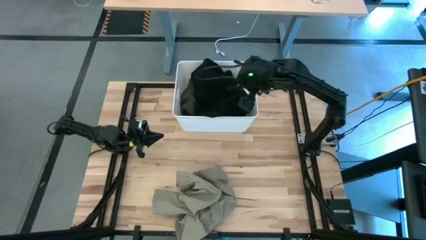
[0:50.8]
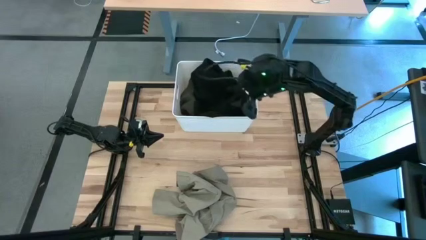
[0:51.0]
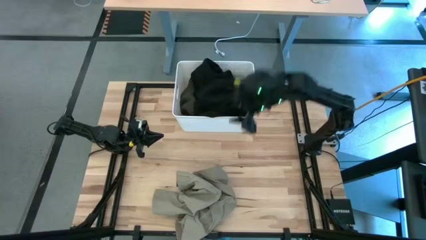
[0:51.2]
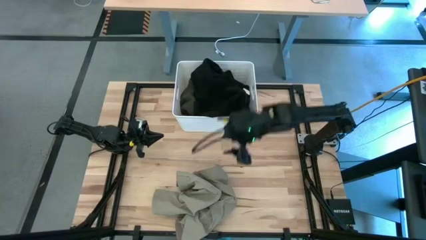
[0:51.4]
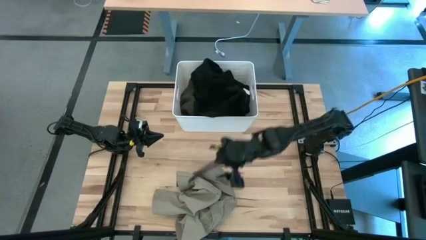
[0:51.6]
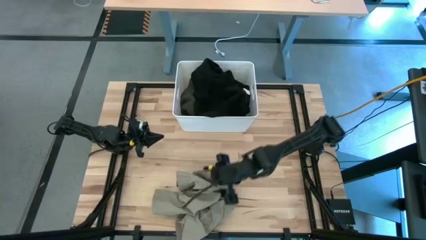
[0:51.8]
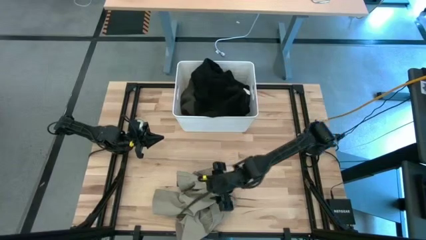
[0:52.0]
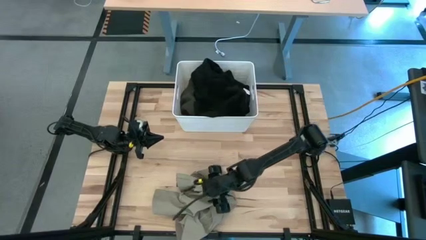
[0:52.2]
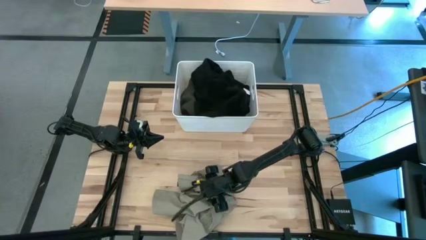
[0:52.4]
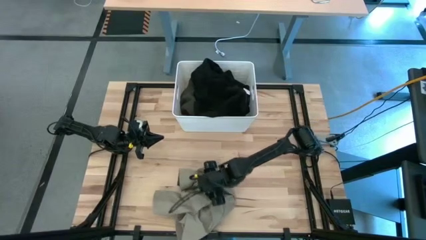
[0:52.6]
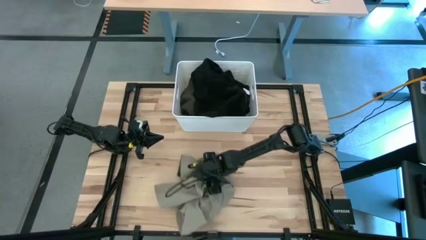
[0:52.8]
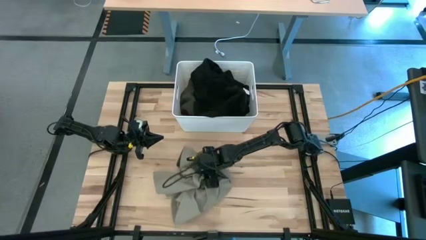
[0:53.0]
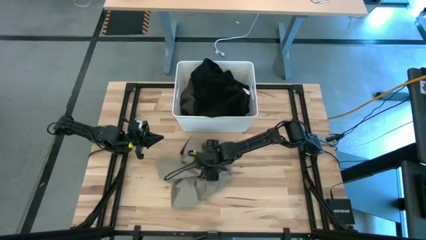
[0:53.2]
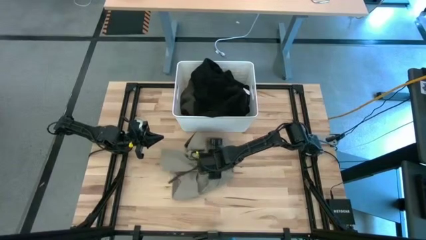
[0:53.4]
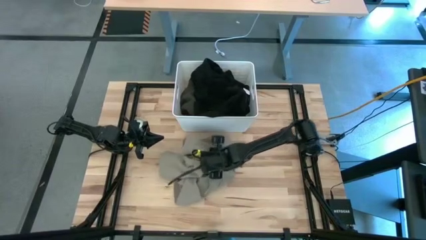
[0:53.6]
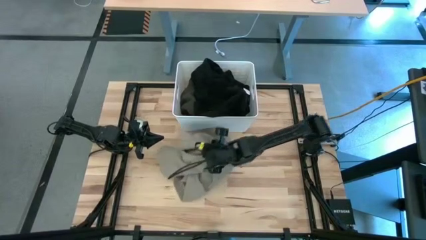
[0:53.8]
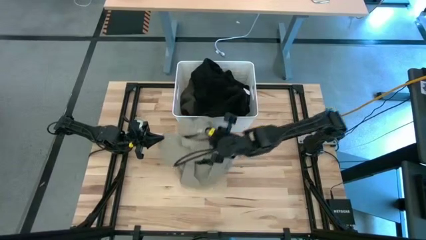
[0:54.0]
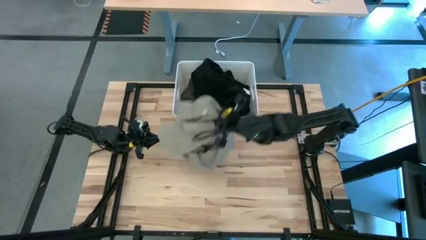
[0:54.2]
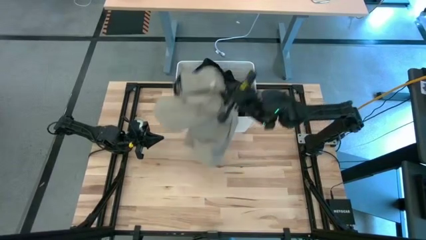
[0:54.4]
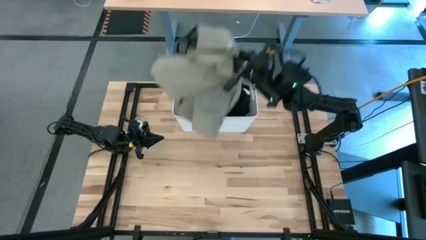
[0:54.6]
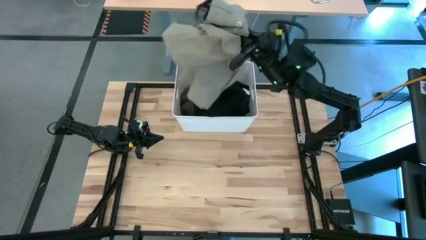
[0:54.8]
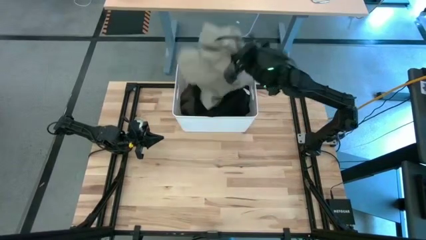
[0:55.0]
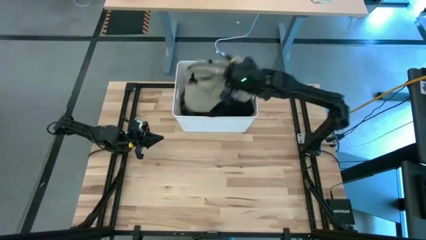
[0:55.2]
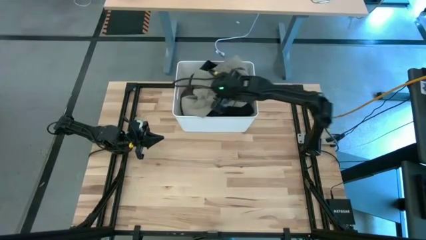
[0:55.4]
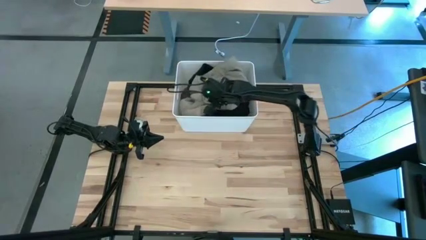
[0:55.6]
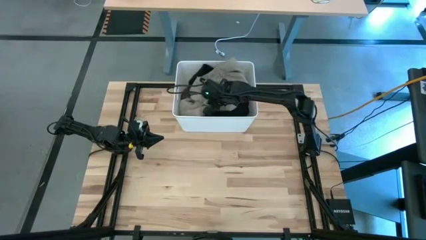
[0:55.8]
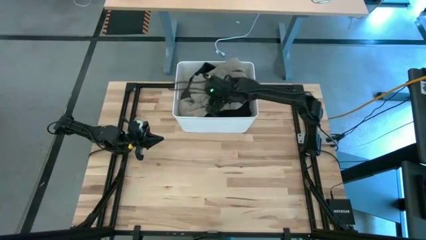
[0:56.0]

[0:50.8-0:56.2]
Task: Sort clothes
Put the brown pants into the white laundry bin

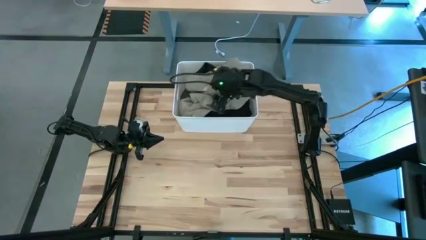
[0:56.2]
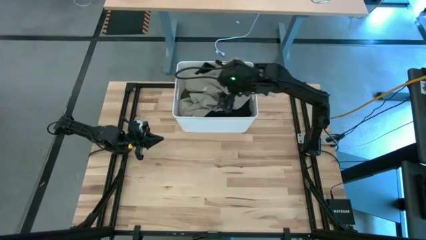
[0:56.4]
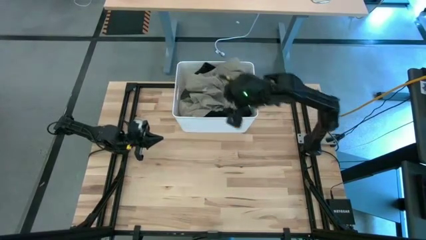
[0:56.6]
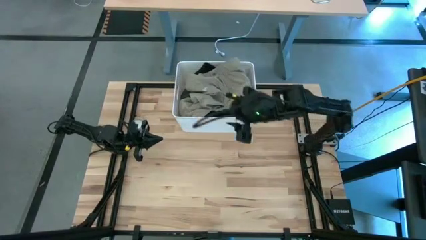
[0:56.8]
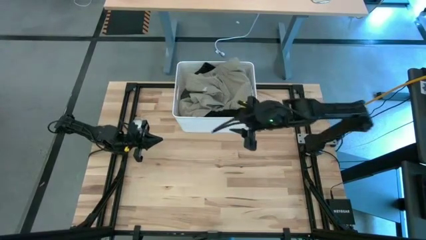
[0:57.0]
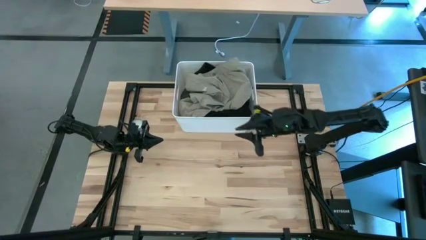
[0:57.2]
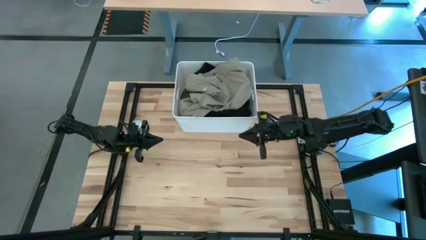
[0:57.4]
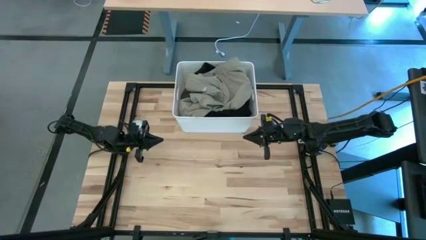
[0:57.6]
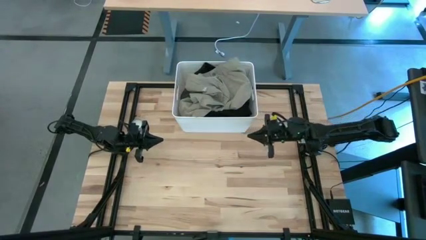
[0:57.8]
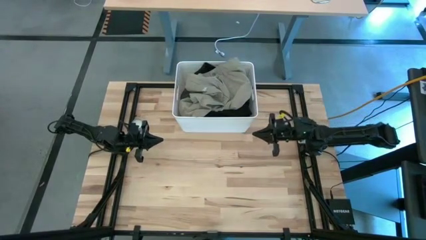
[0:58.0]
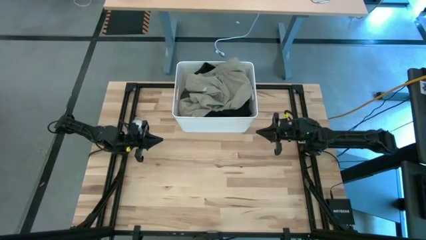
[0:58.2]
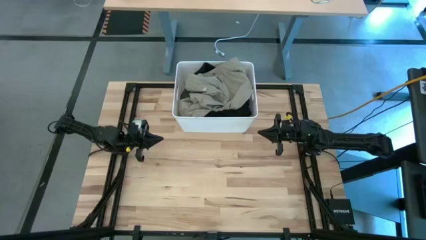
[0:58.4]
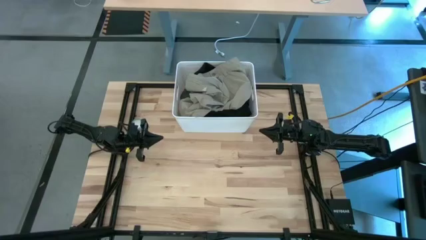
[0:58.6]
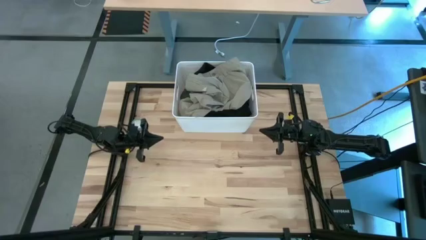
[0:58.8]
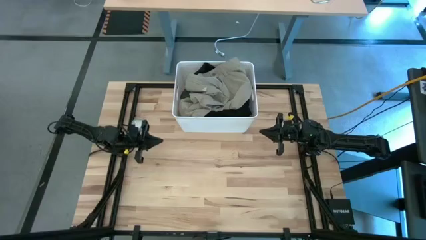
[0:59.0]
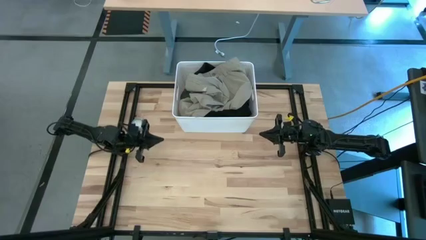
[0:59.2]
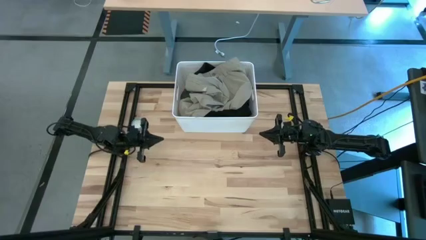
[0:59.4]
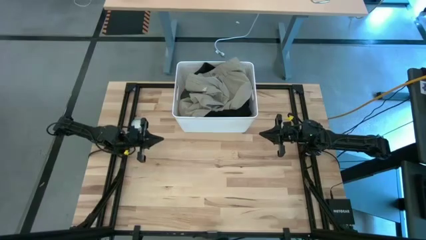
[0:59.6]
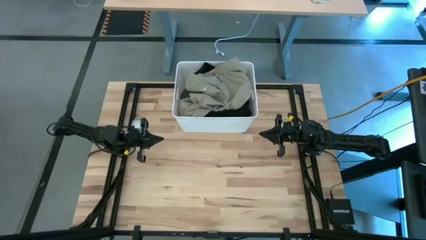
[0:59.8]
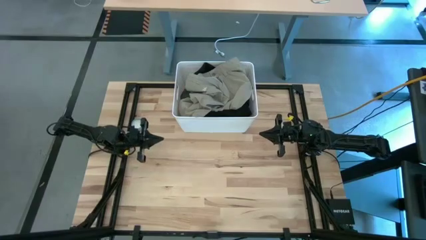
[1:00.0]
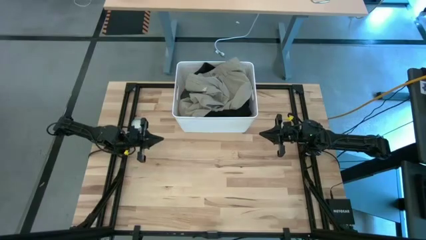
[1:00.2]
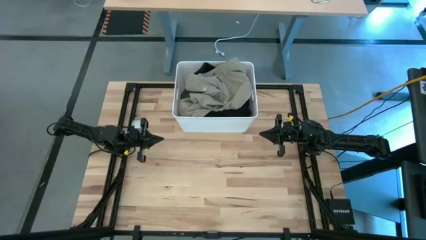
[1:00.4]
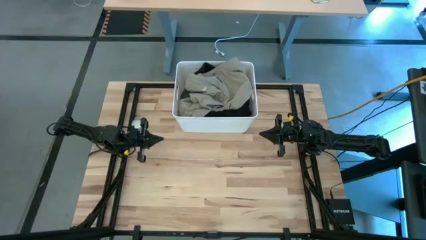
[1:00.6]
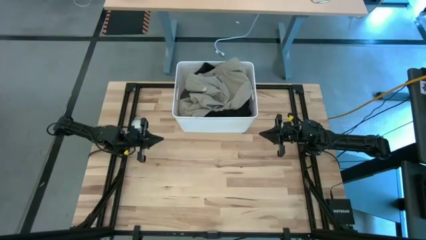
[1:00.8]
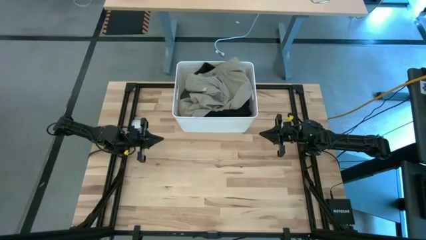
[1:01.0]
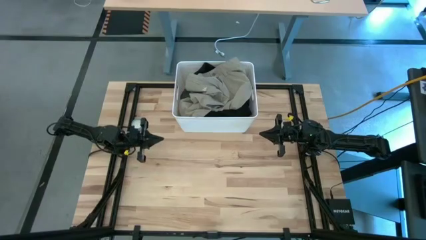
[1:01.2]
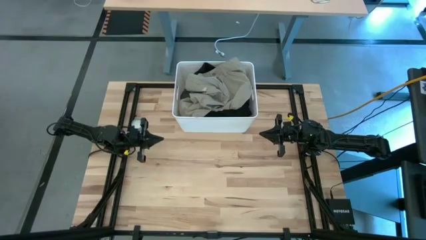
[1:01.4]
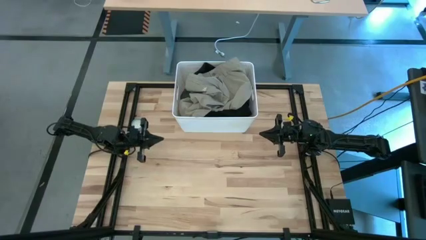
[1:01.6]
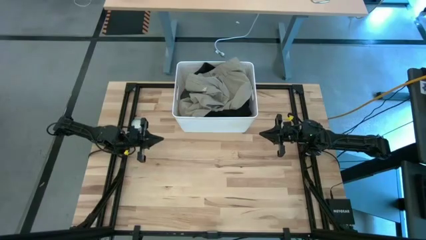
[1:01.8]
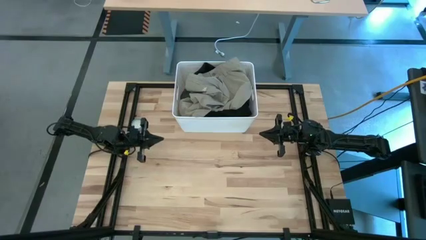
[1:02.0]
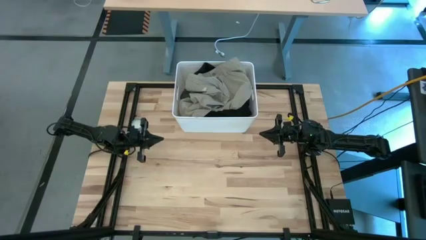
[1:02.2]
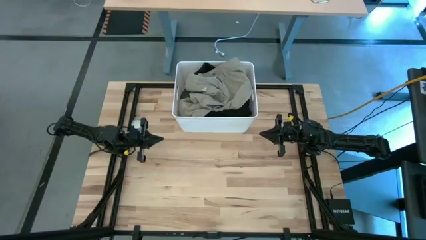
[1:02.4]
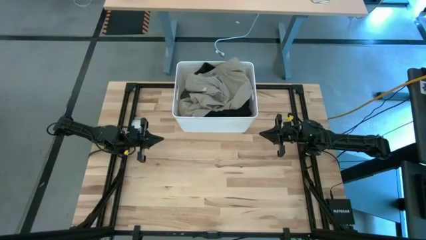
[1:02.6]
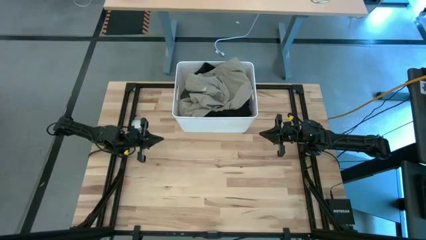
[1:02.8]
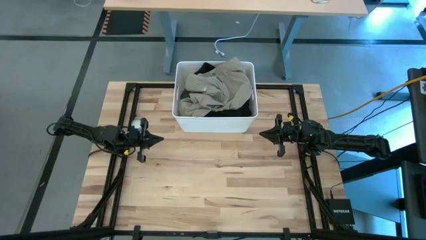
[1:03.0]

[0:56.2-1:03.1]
Return to Home Position

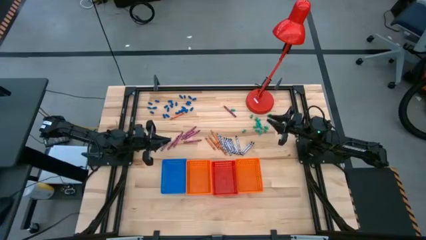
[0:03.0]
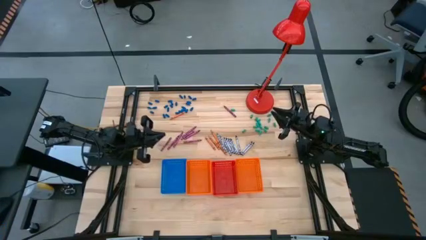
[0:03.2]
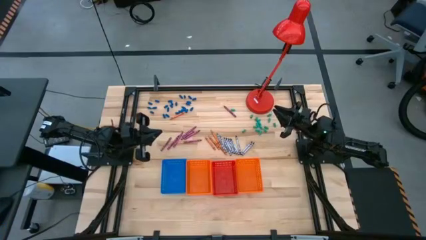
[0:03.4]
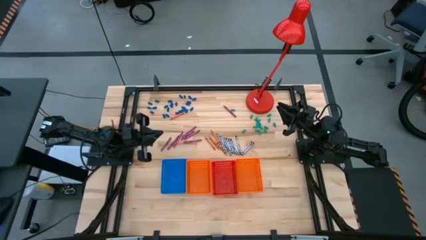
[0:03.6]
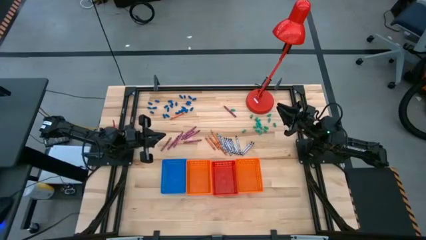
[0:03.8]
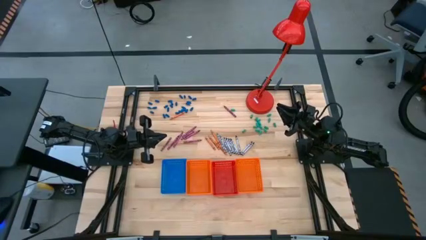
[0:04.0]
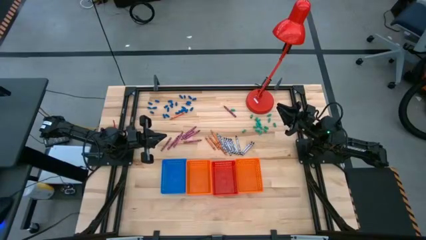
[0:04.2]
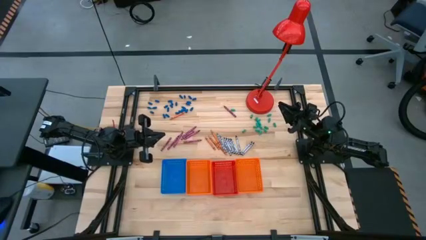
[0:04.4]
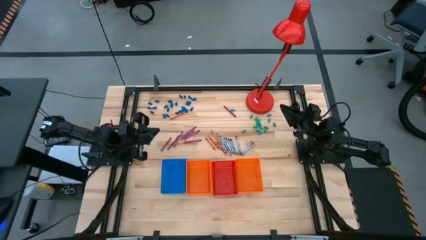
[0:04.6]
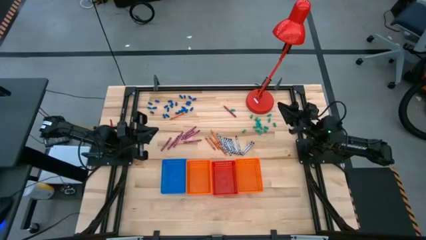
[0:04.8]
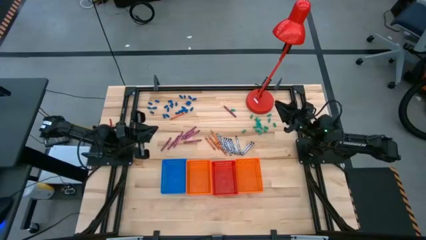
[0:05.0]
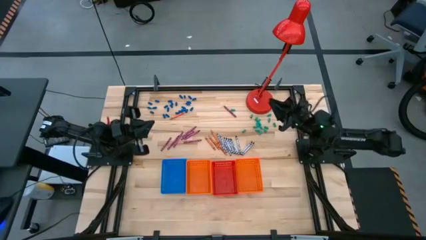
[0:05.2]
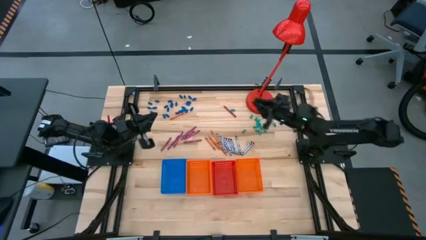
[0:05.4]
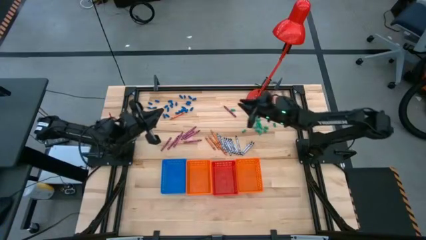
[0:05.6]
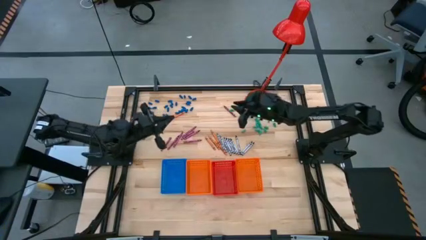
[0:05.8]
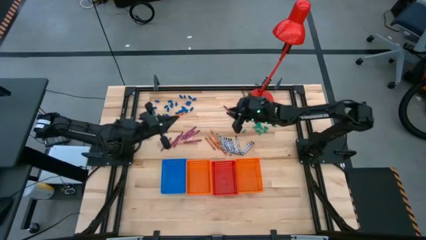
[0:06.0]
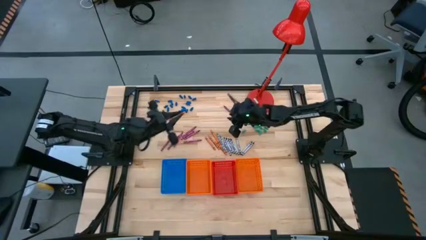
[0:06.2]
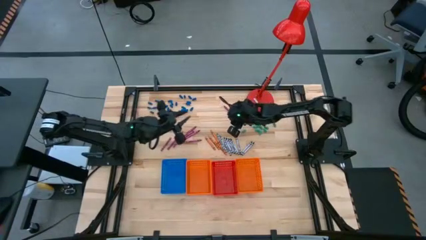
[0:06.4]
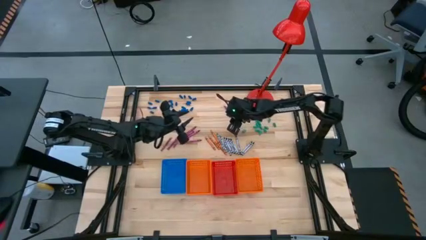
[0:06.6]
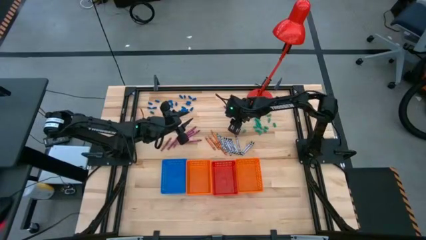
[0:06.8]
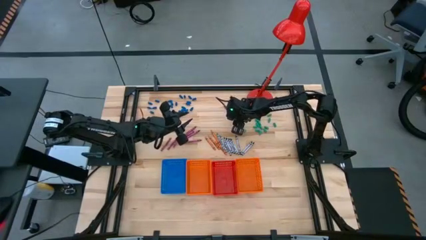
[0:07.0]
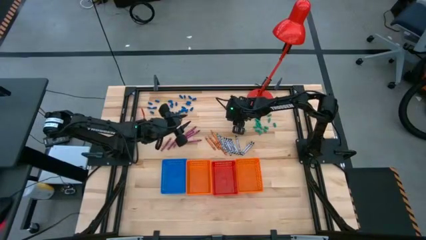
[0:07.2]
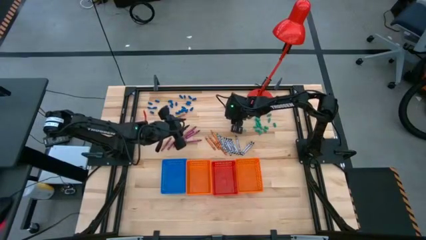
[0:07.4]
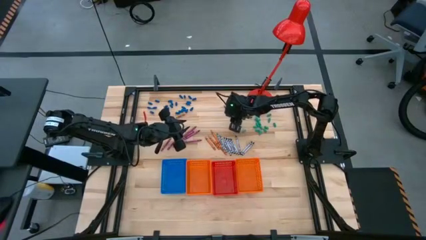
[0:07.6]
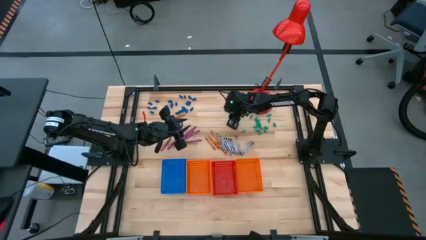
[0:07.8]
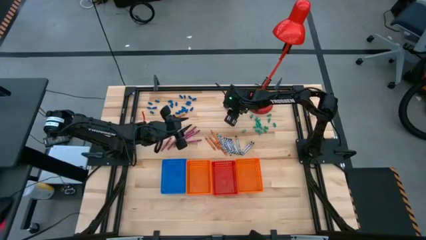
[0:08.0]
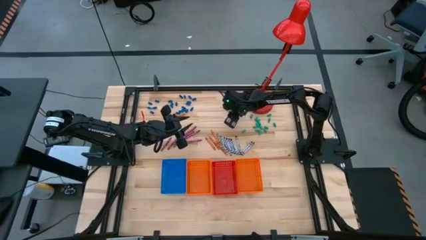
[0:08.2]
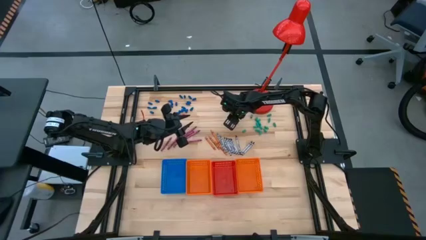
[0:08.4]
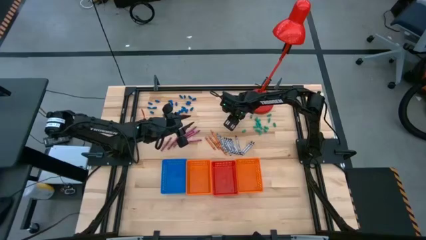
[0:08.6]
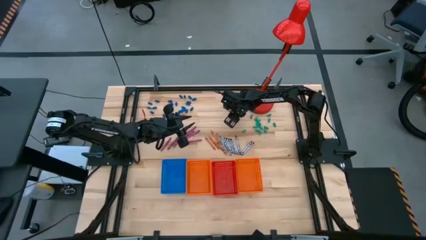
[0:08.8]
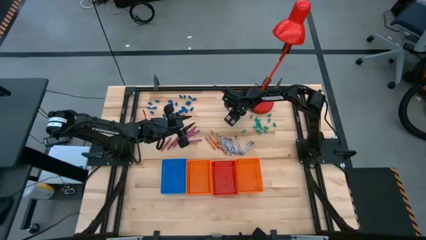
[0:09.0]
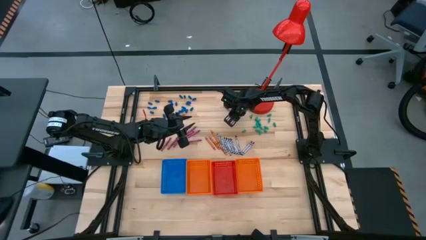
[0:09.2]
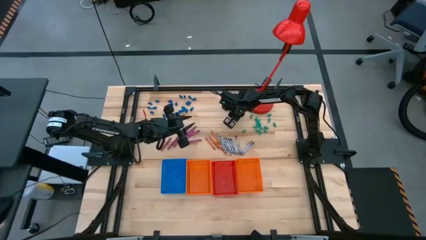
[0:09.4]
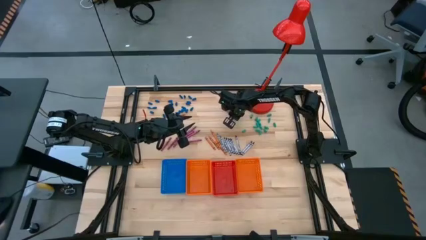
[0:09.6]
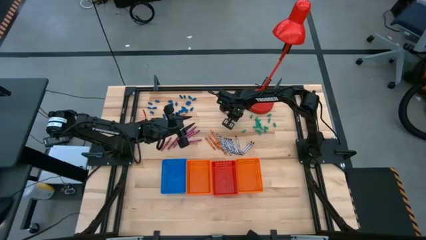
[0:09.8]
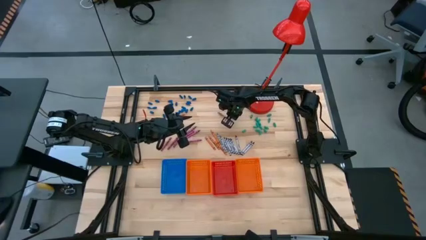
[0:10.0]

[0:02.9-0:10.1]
Task: Sort crayons
Put the red crayon into the right orange bin
